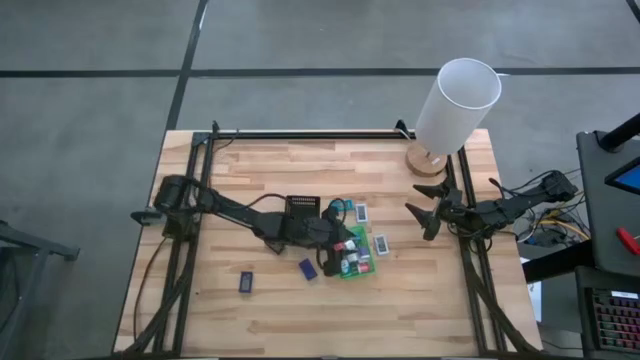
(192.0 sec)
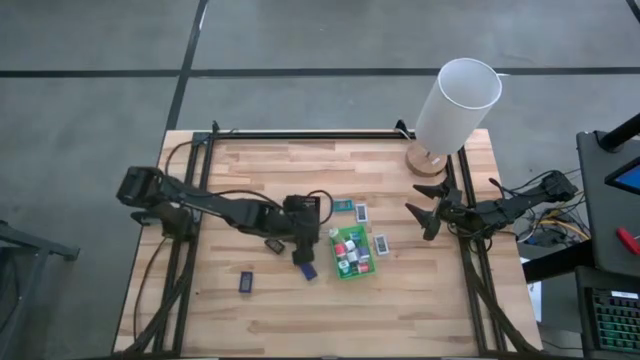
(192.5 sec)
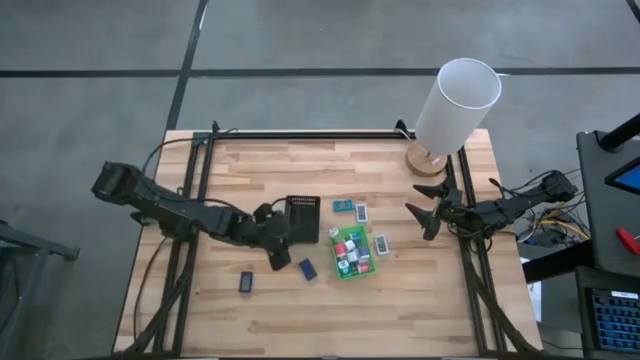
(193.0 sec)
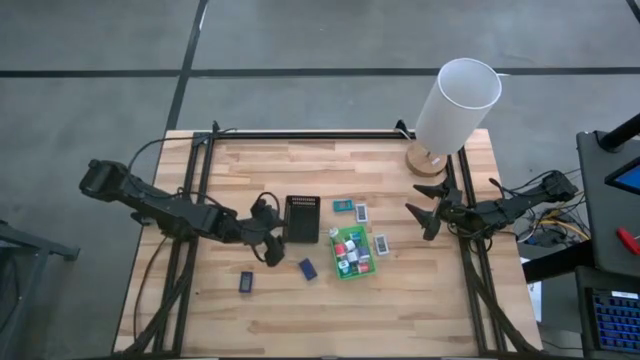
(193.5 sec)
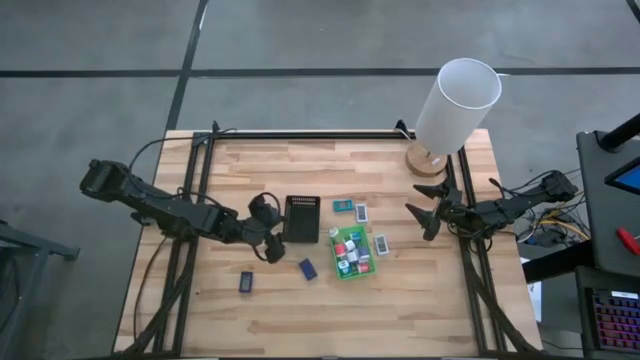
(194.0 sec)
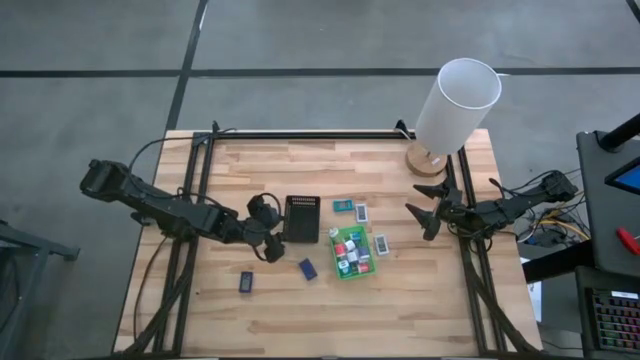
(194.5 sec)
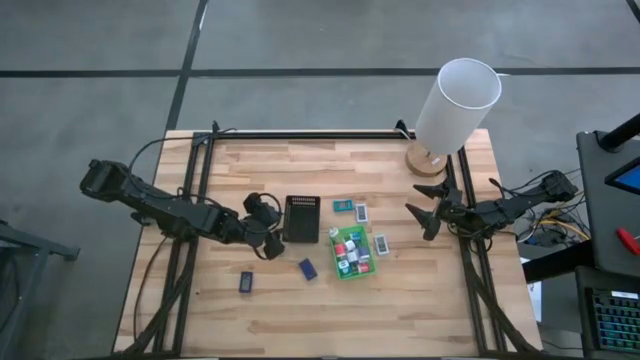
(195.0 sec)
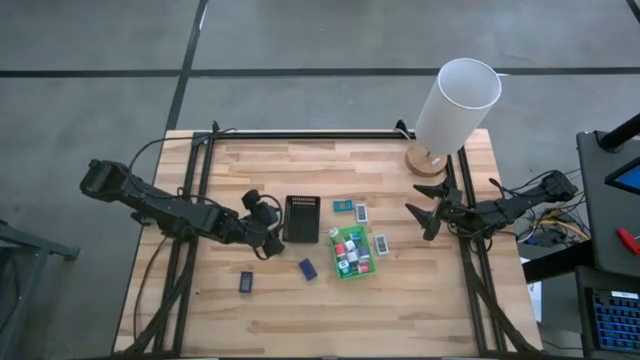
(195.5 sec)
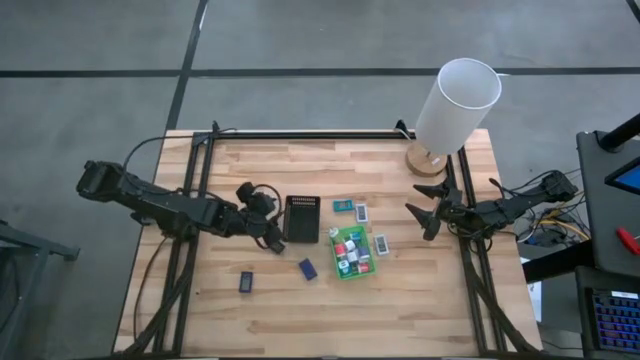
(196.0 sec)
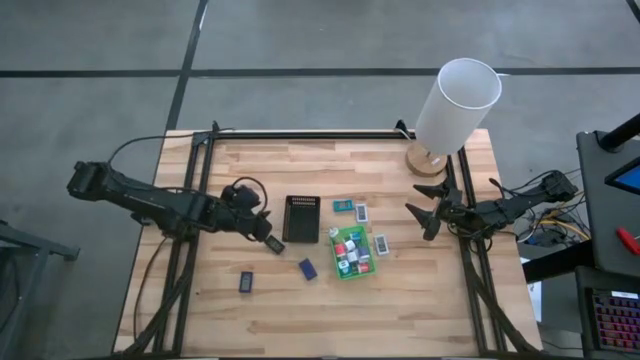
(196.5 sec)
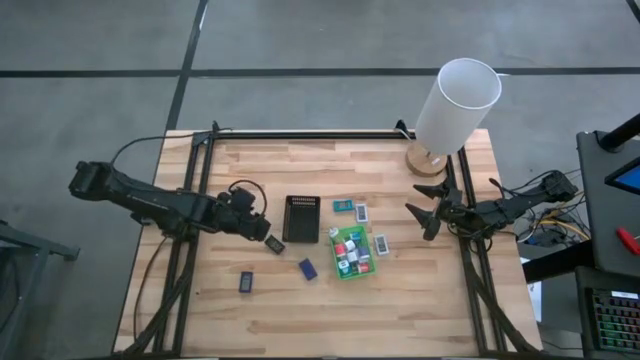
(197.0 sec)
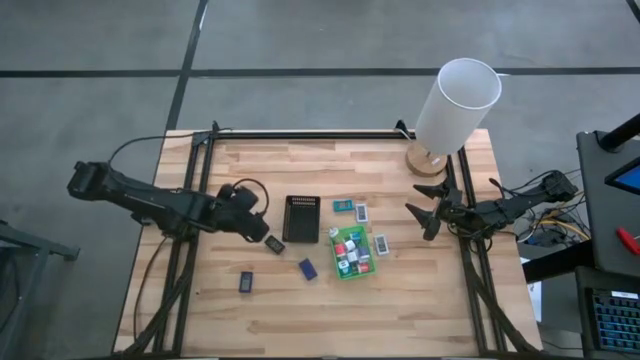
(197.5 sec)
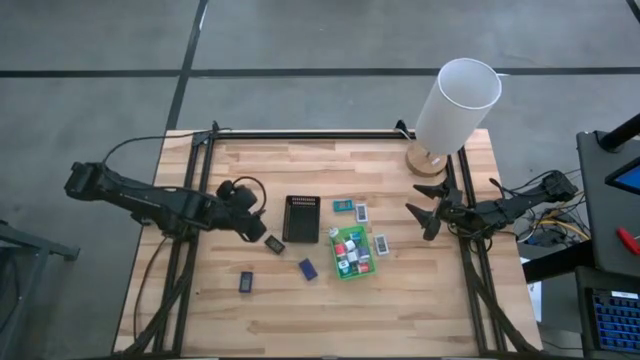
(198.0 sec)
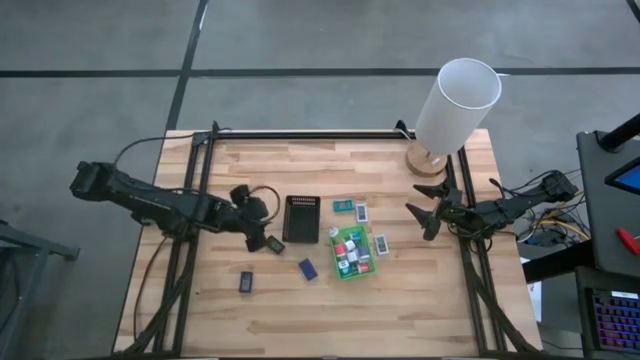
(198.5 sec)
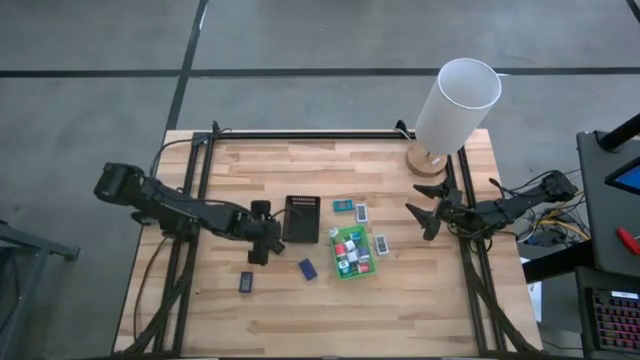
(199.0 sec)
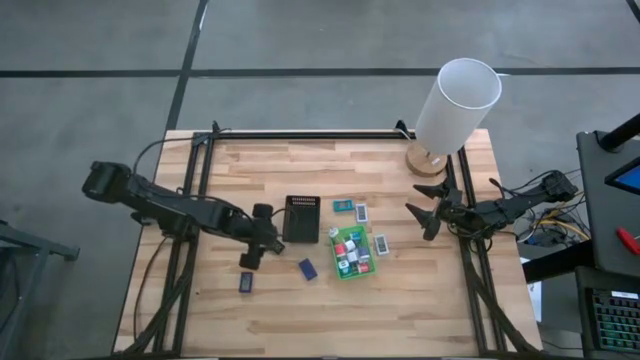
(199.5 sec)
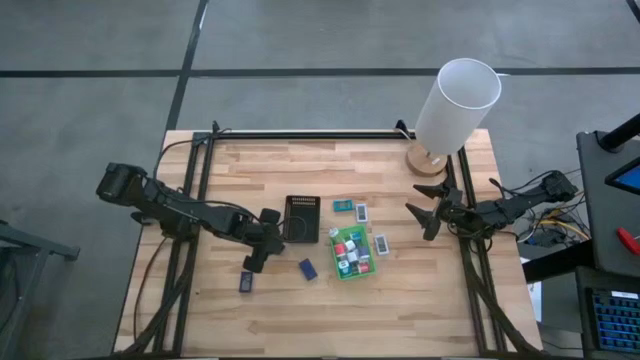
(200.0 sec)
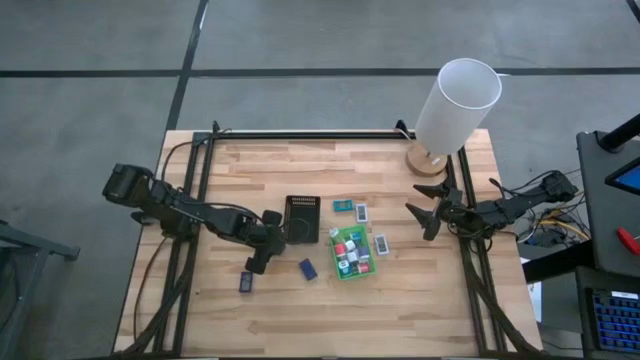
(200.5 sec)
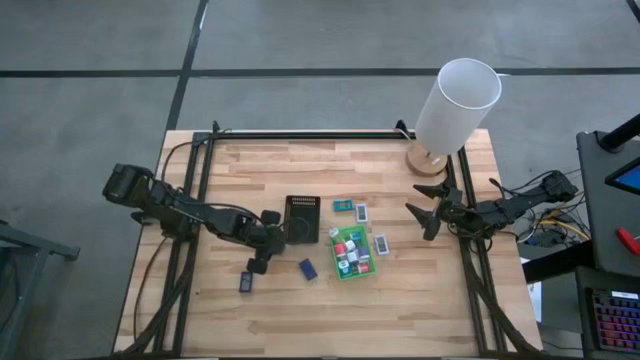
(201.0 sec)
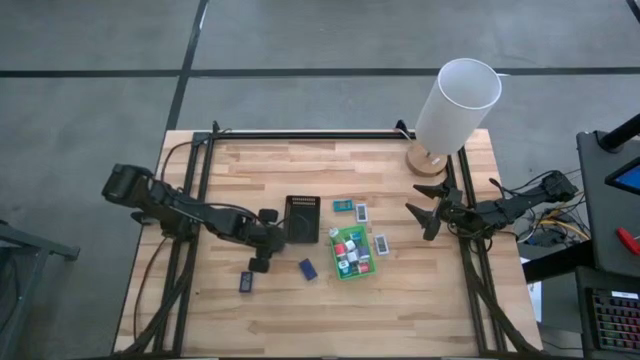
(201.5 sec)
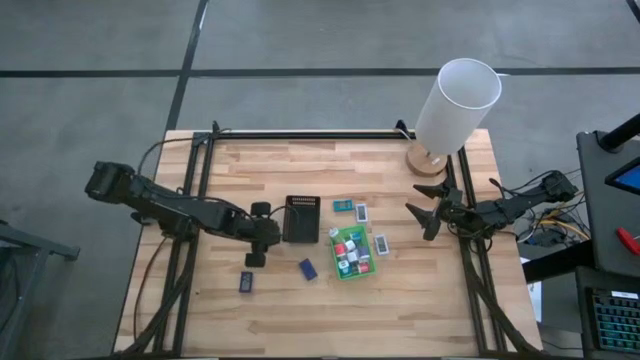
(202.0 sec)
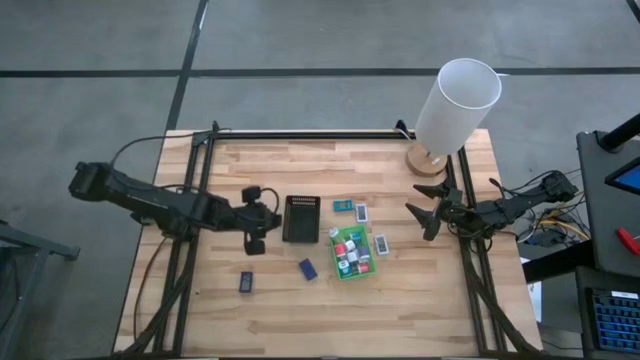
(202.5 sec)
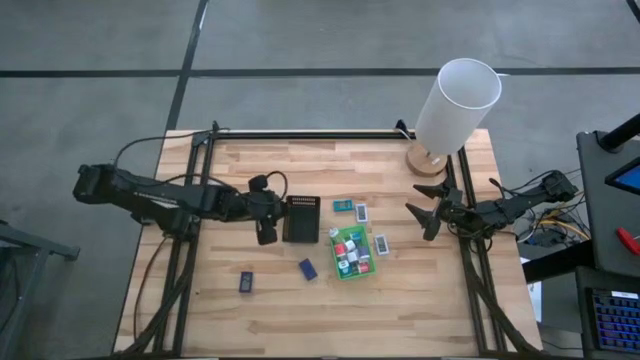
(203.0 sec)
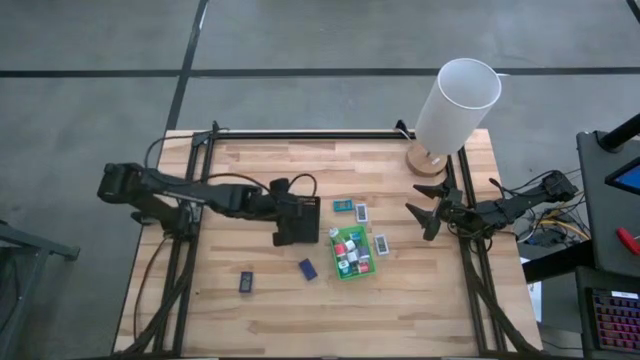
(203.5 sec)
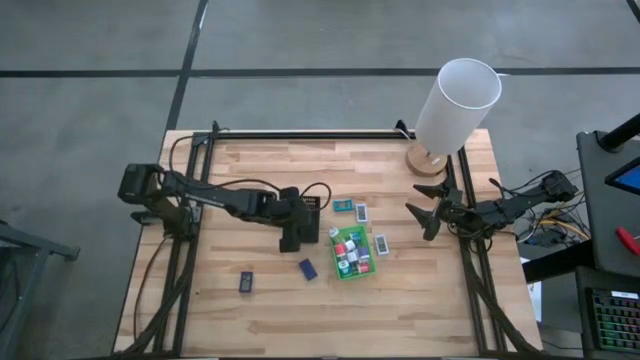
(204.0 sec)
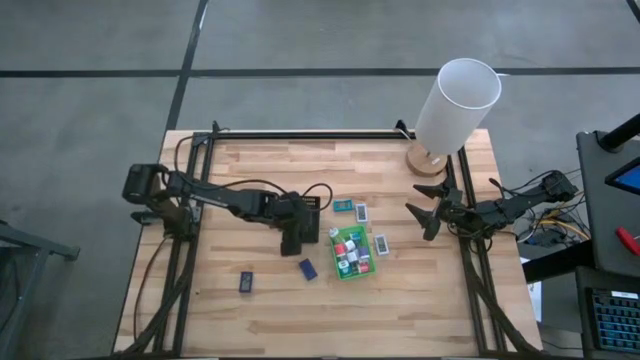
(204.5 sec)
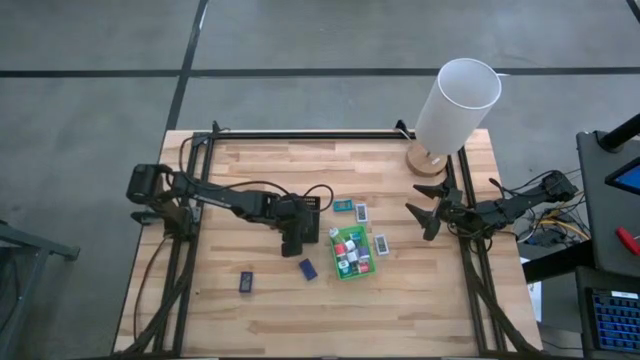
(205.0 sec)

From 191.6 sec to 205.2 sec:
Task: Pick & Place Office items
Put the black digital clock into the black bin

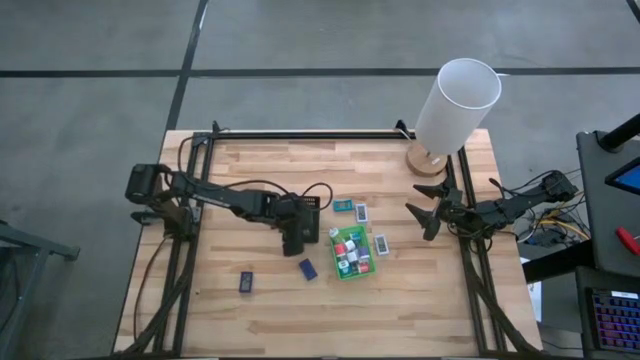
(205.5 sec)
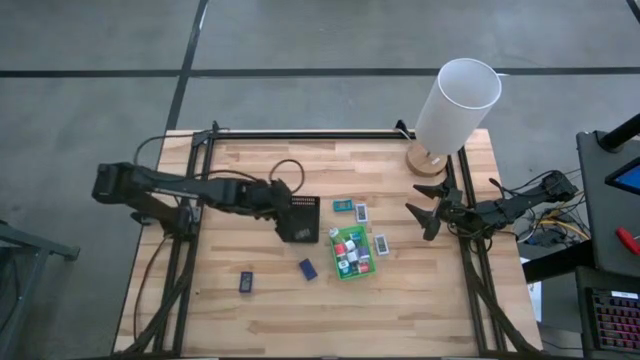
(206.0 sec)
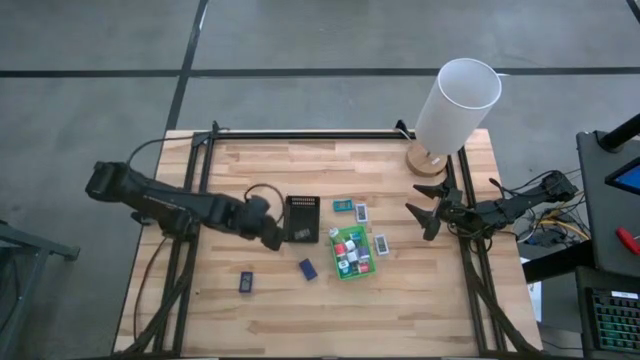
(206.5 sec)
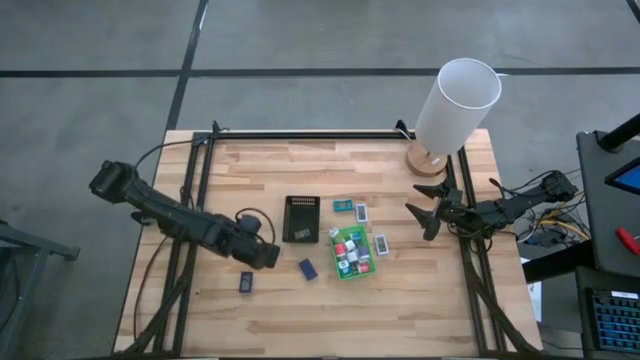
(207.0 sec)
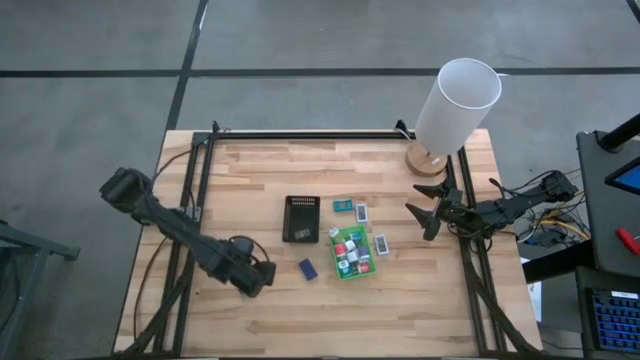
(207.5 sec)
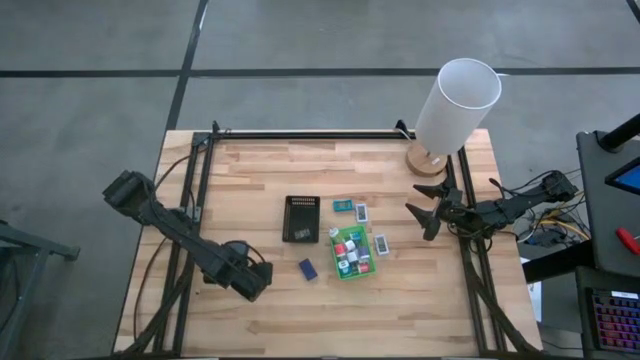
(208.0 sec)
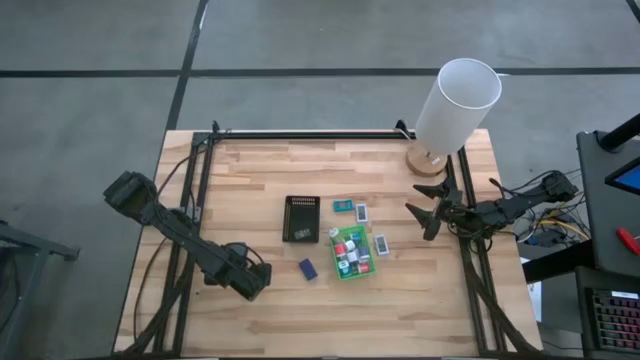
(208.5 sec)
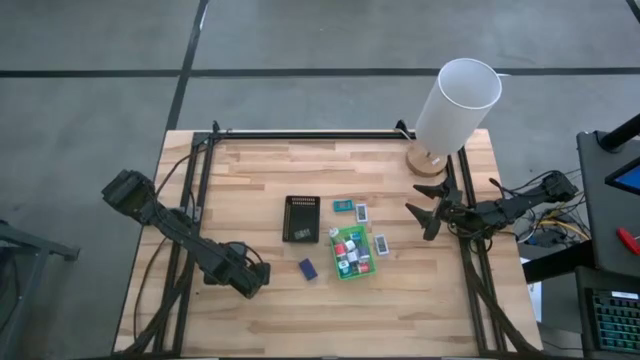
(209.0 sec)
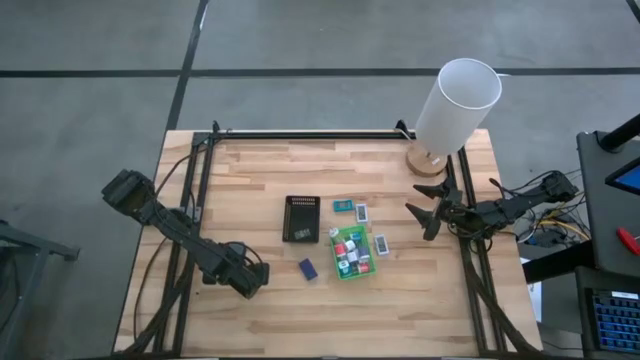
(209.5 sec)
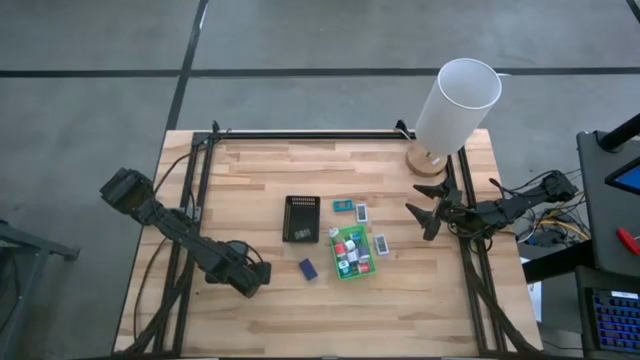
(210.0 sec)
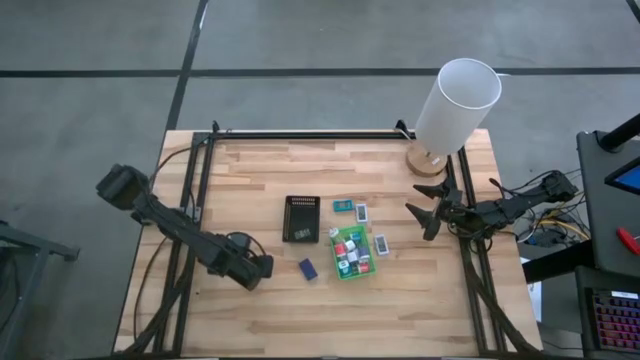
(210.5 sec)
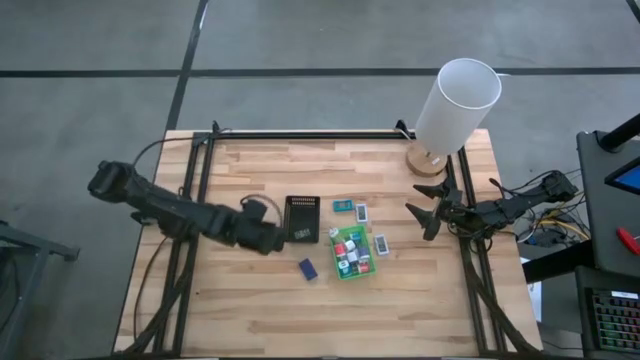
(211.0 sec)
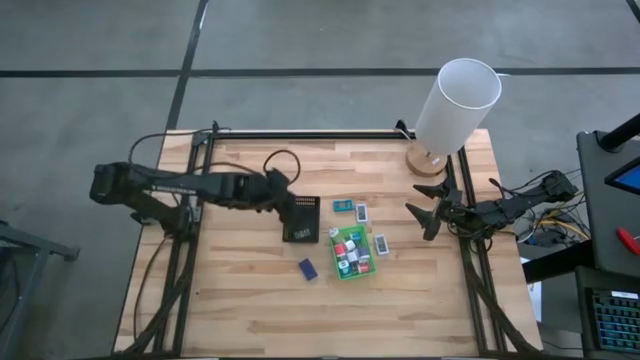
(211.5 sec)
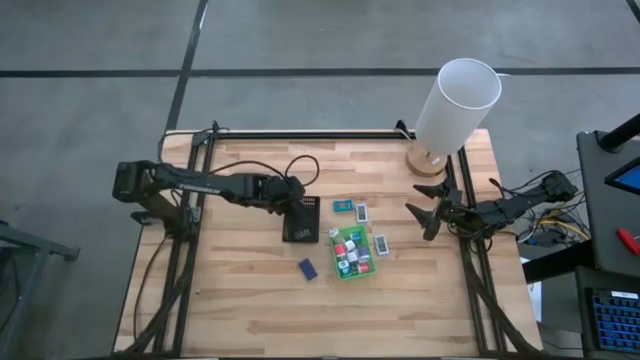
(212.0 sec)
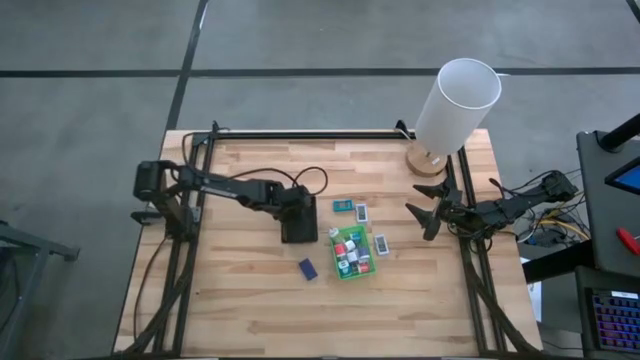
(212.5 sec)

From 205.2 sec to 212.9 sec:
Put the left blue digital clock into the black bin
